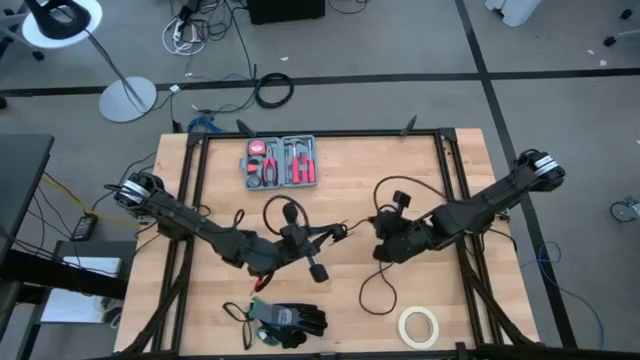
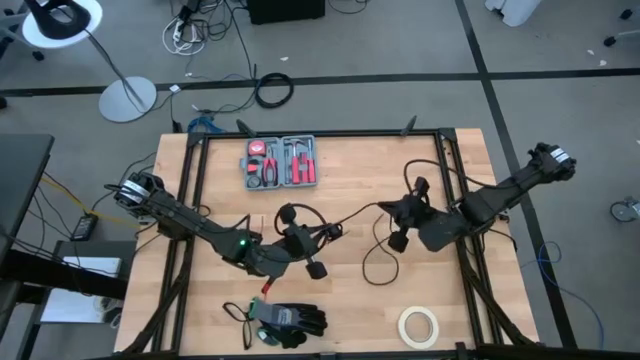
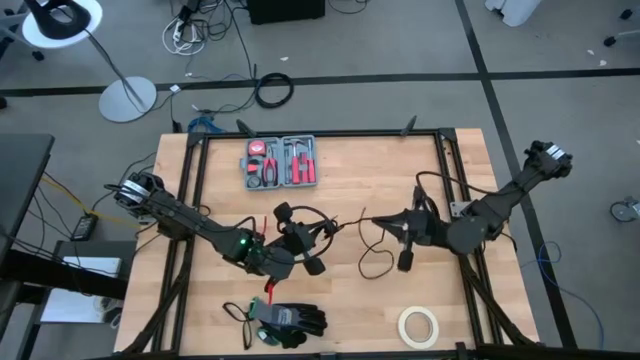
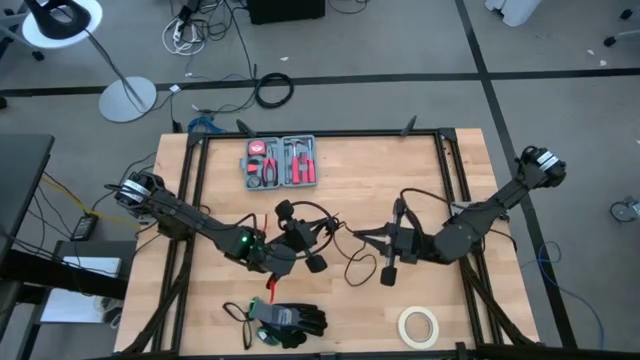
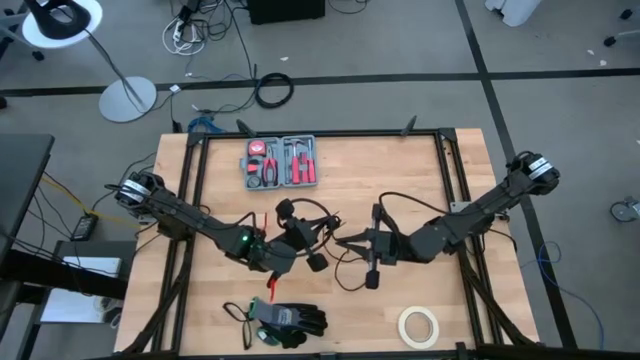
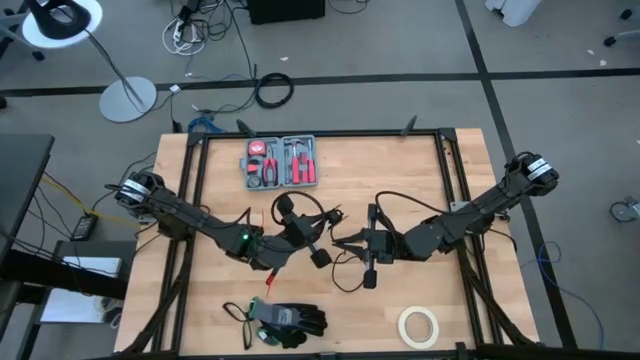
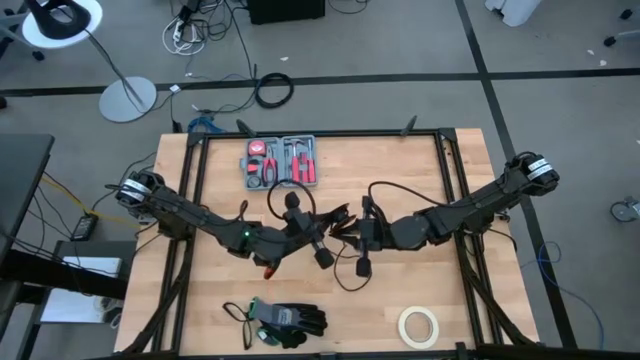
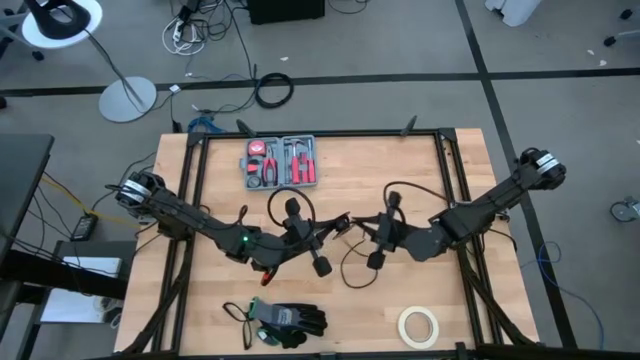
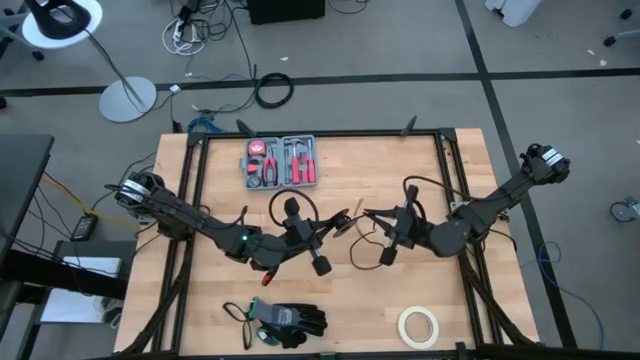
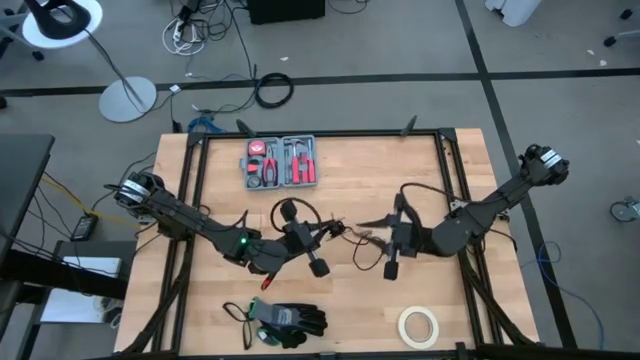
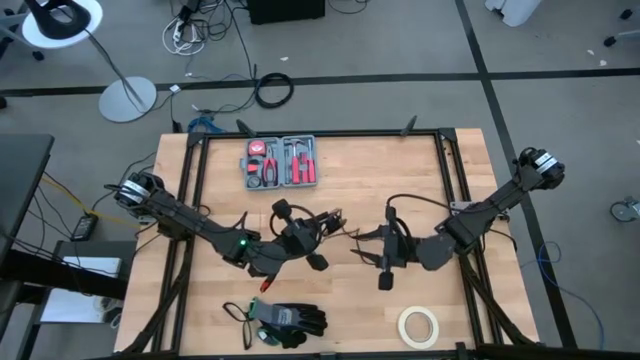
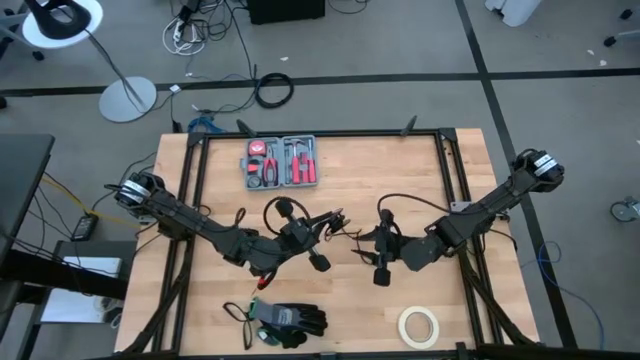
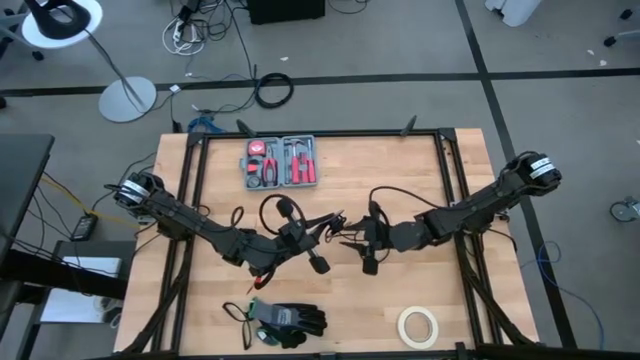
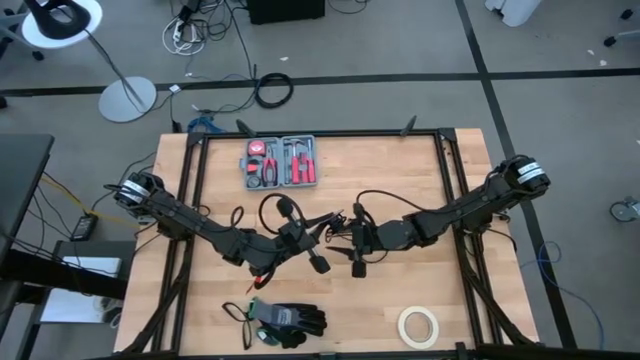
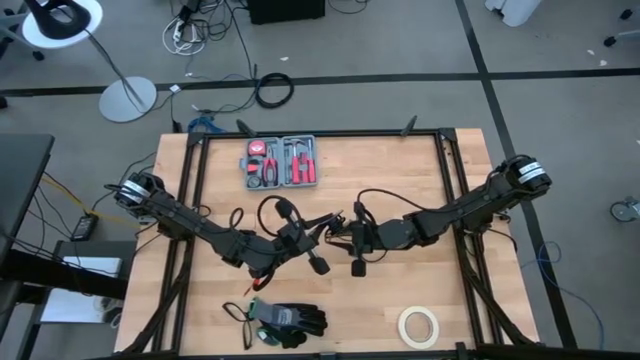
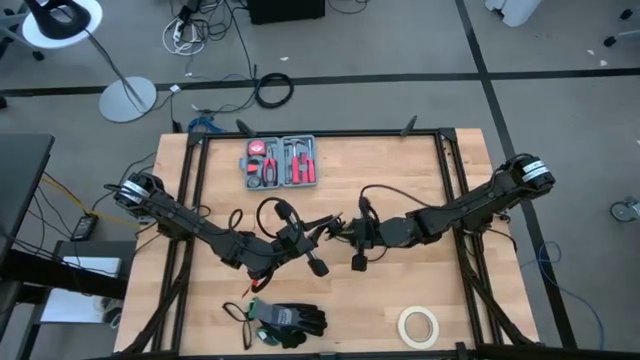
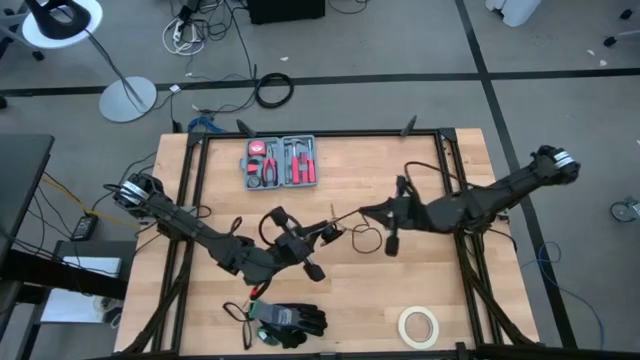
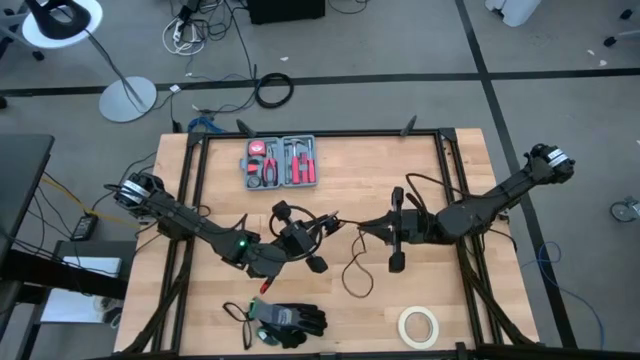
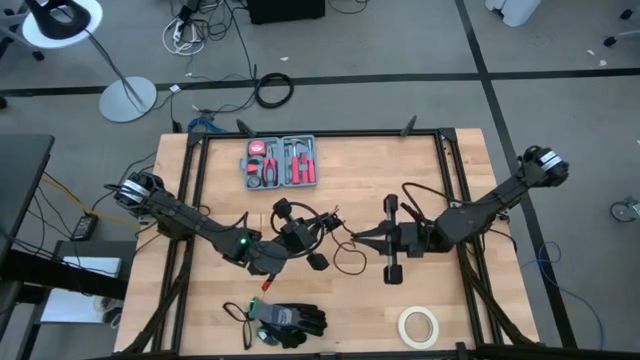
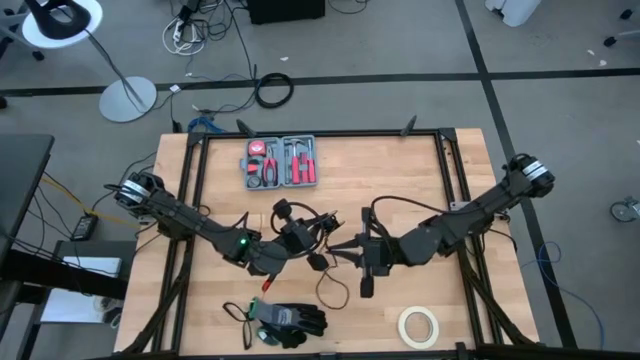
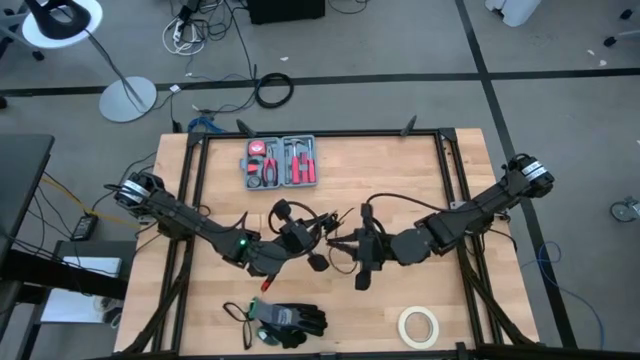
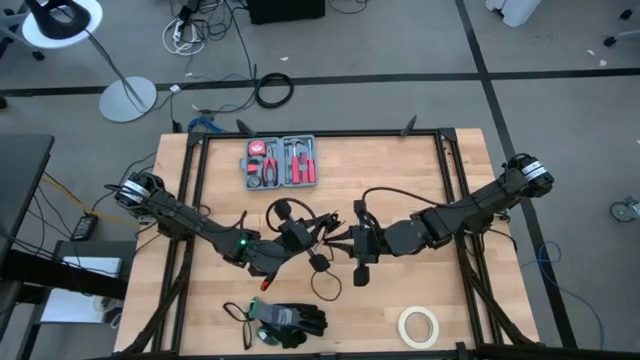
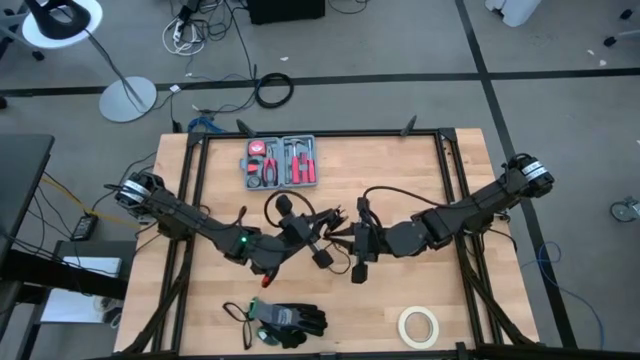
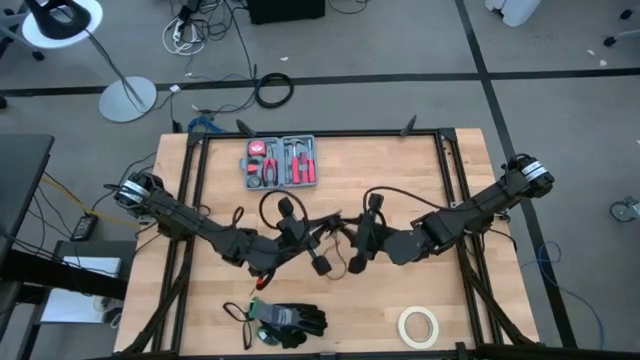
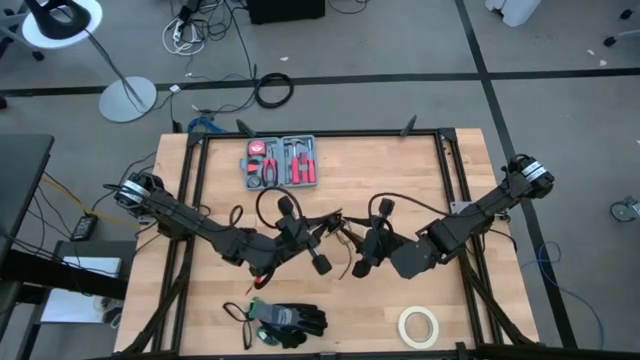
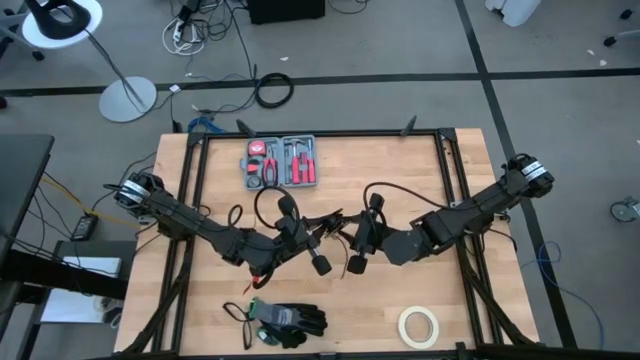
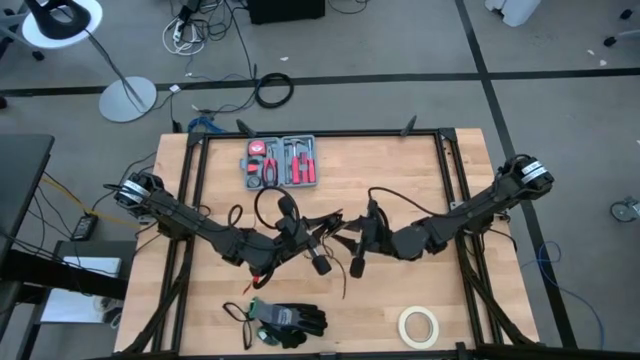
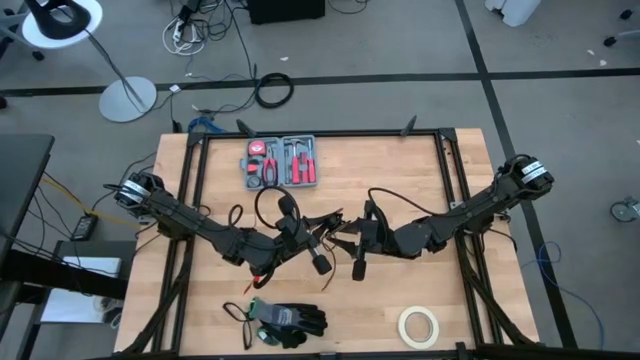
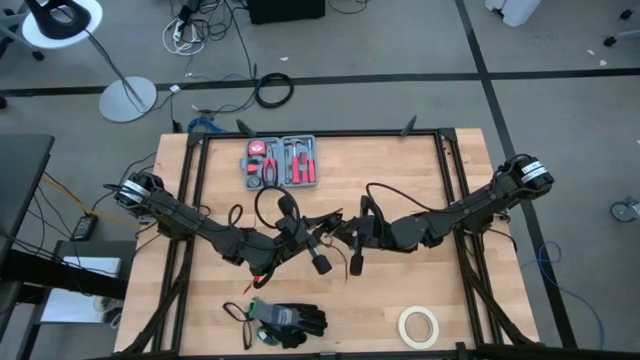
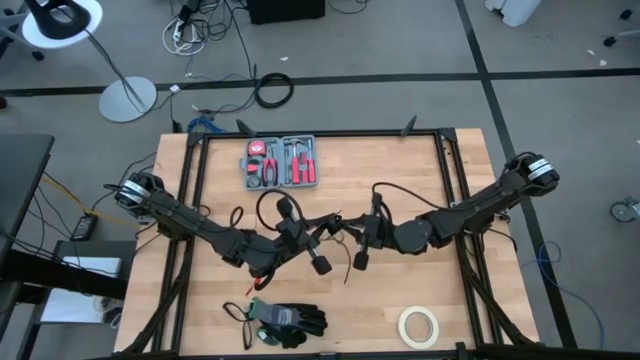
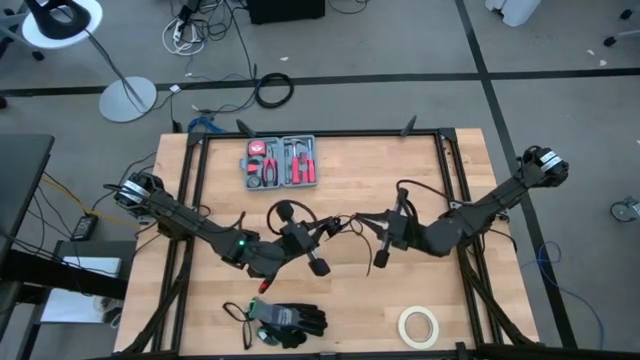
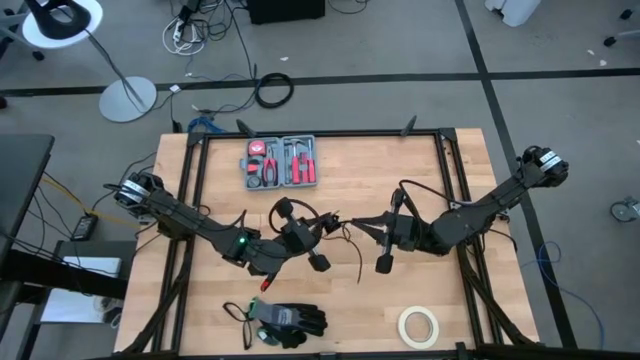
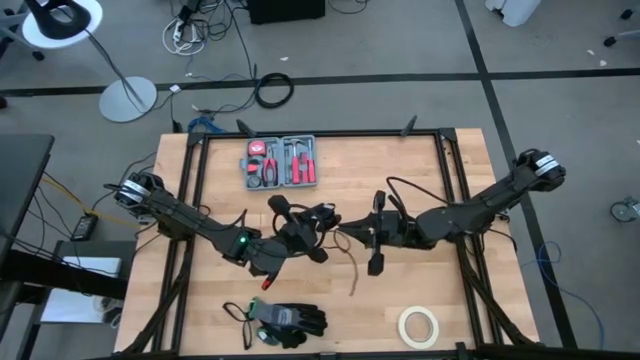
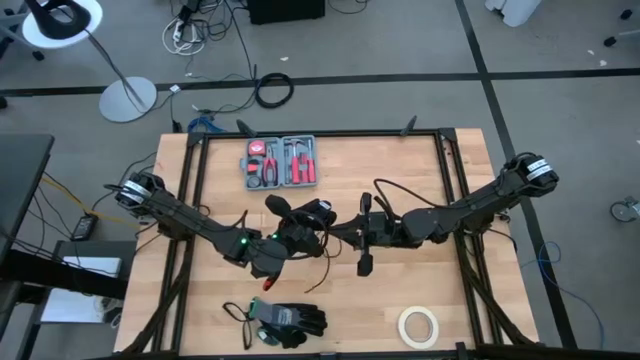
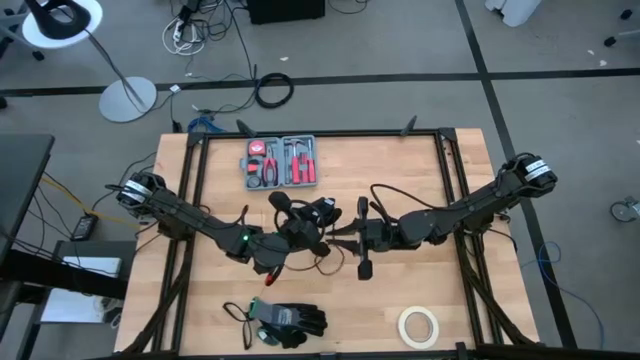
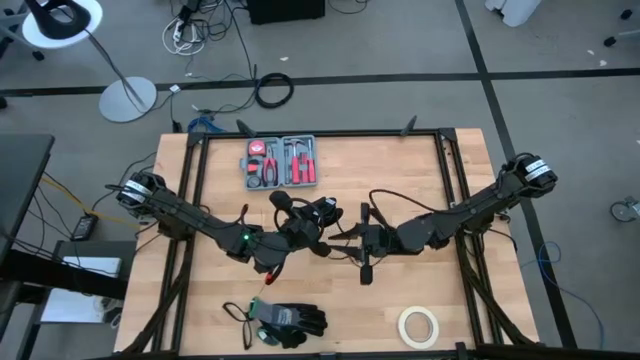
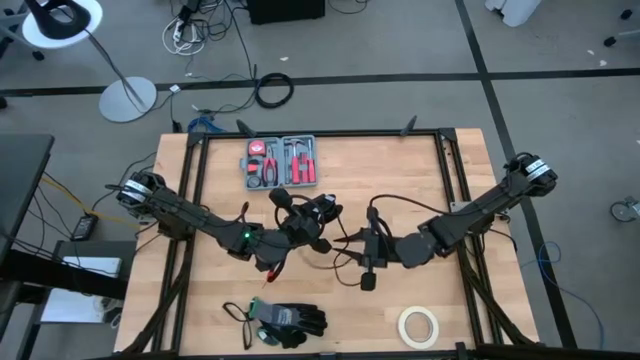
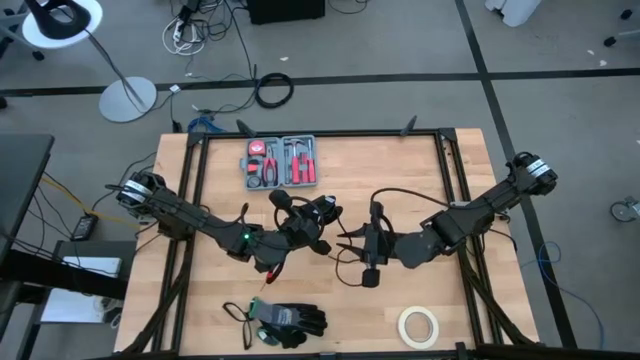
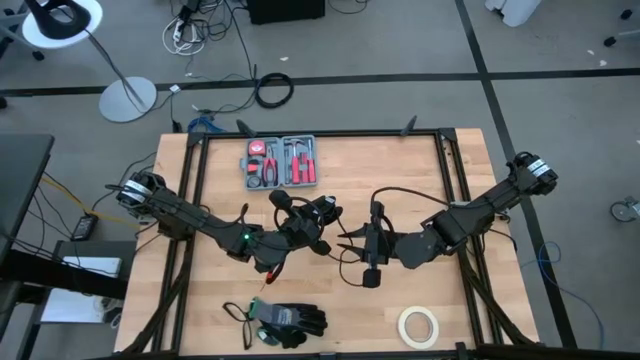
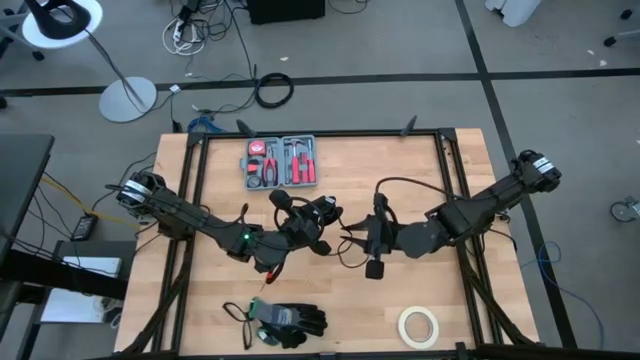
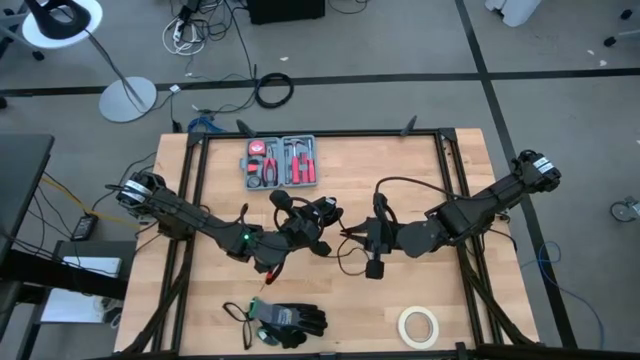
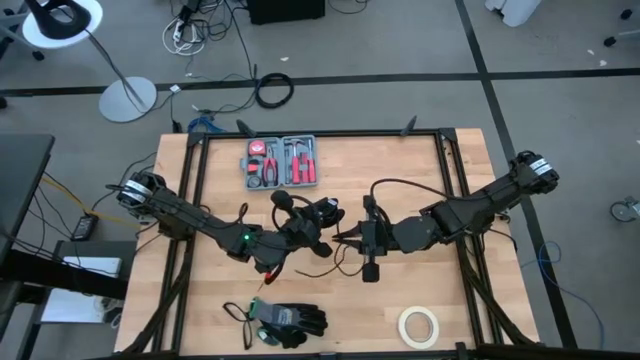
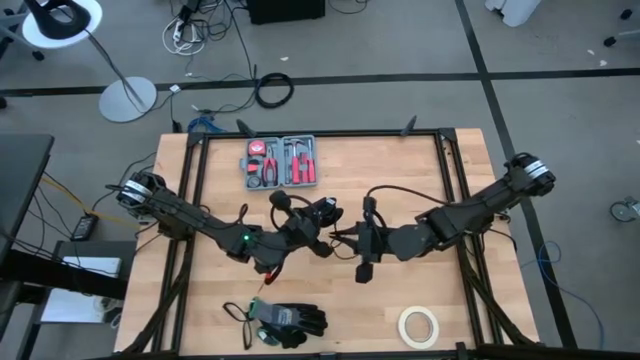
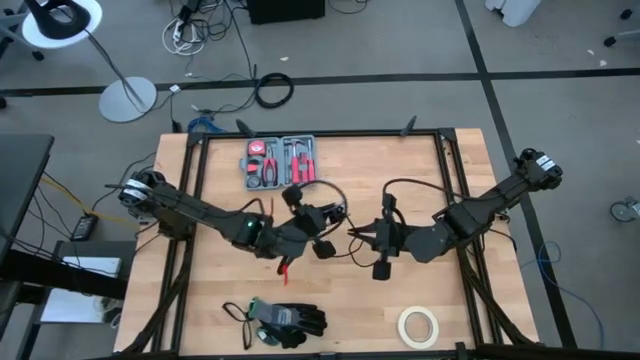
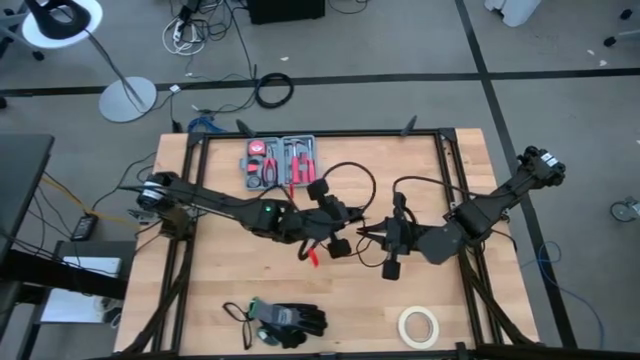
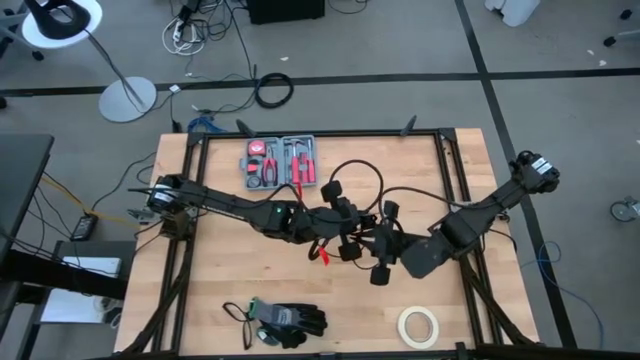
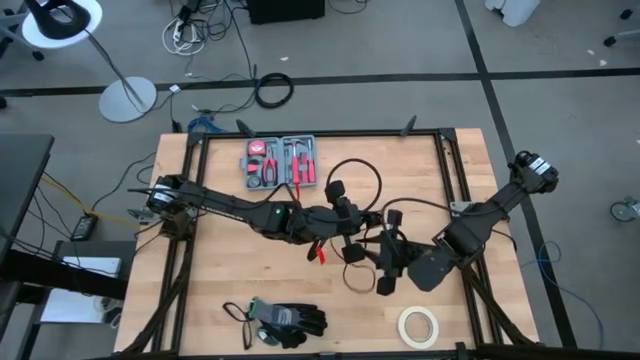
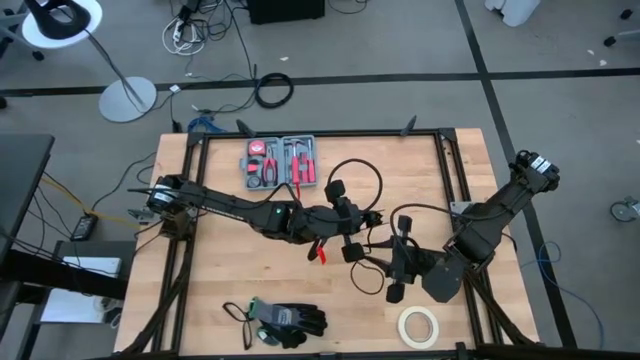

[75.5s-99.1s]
Task: Coil cords
Coil the black wire cable into the black spool
